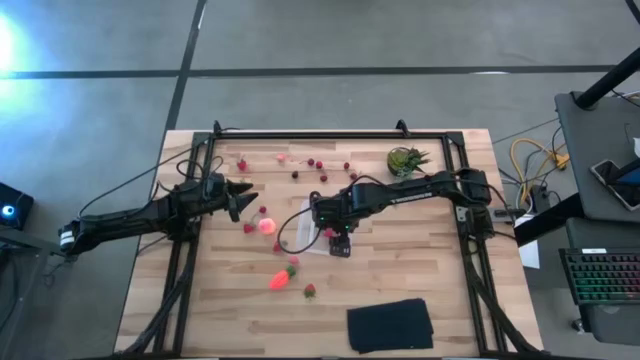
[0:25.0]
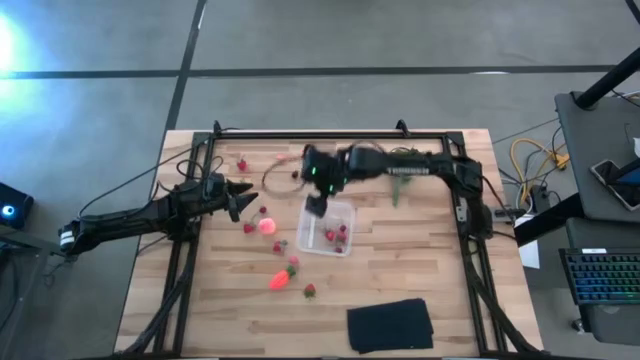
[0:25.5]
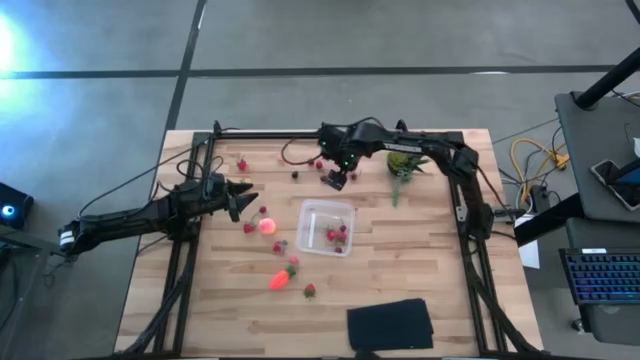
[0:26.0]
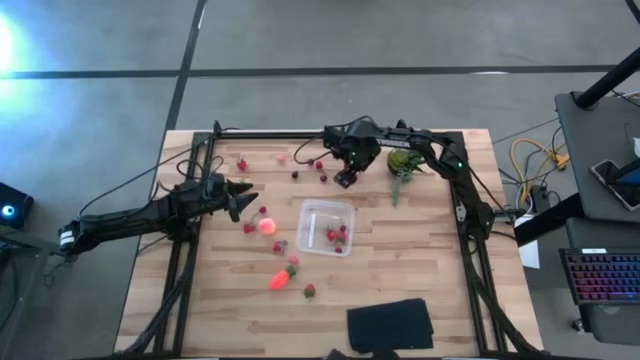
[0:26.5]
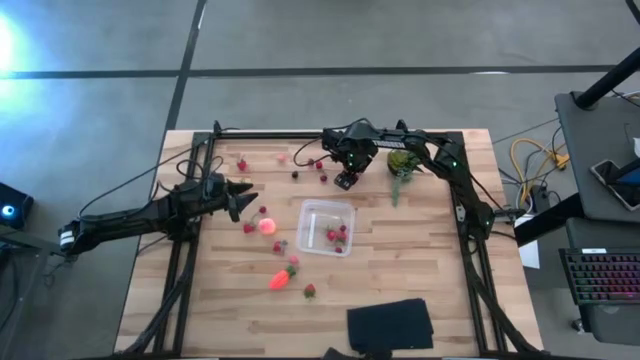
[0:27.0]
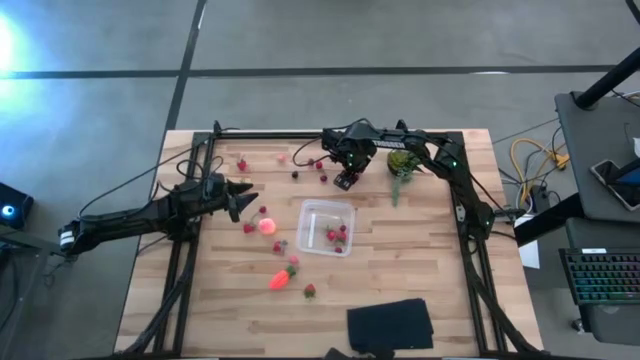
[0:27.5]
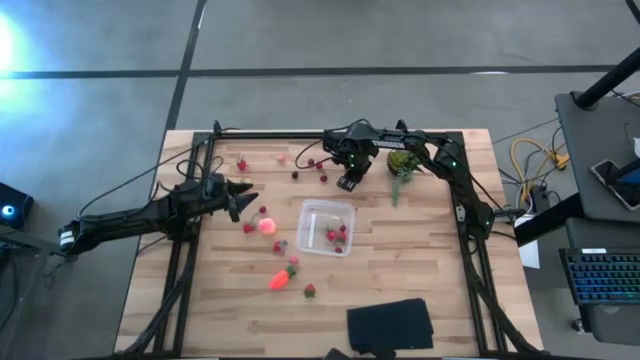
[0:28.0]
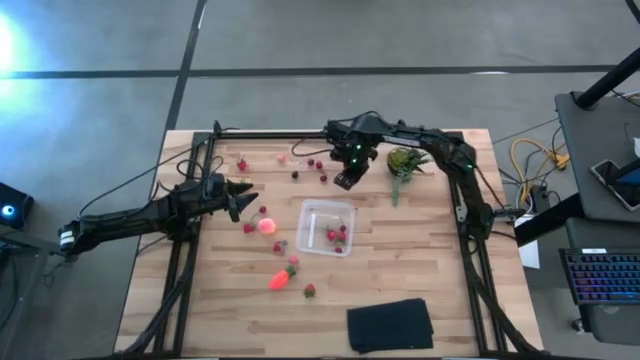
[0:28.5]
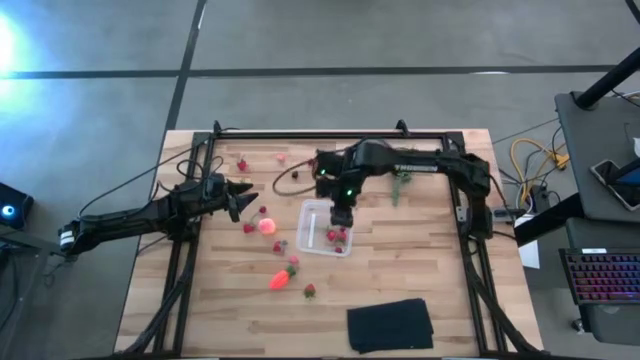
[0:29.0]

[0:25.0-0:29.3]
Task: Pick and placing Produce into tupperware
Put the red cherry into the transparent bin

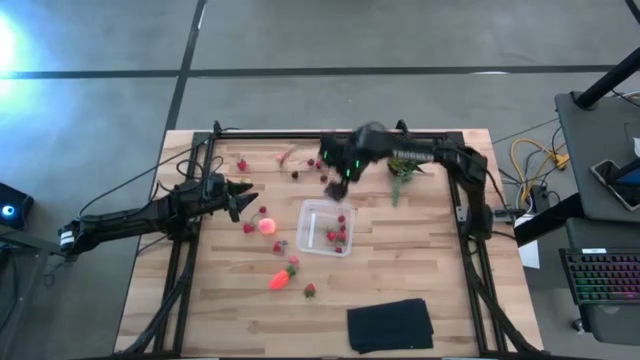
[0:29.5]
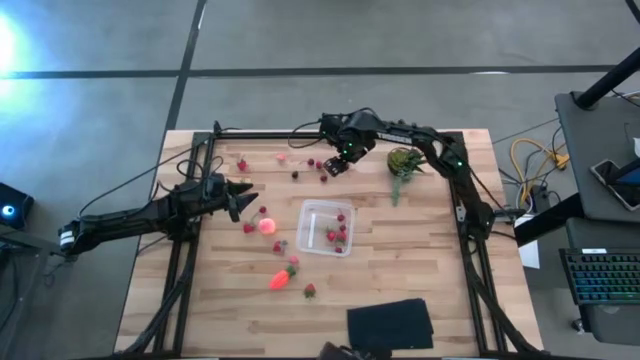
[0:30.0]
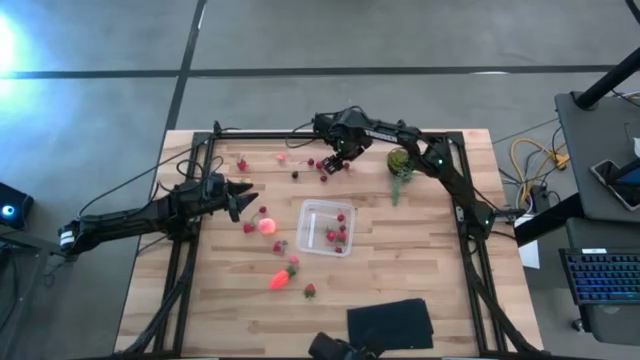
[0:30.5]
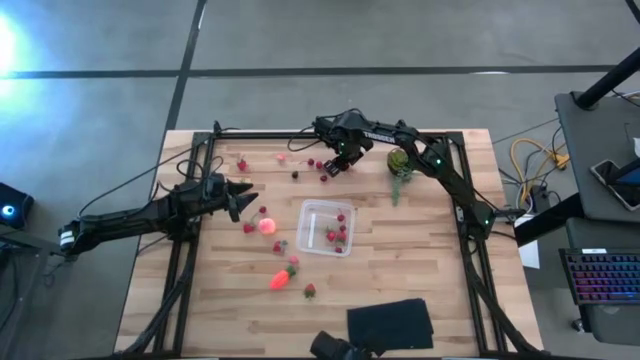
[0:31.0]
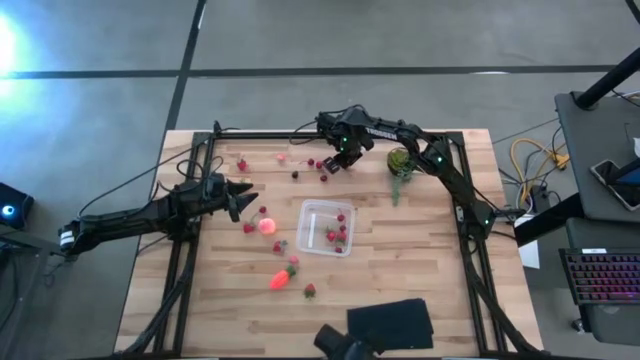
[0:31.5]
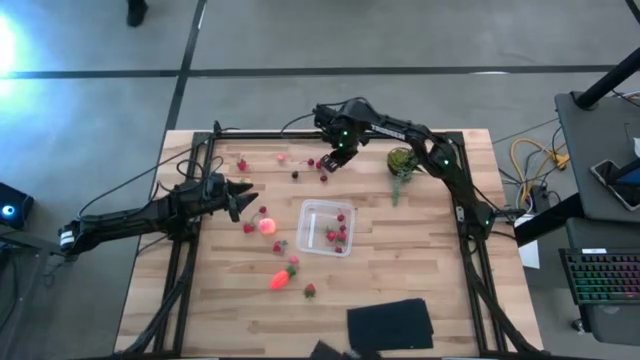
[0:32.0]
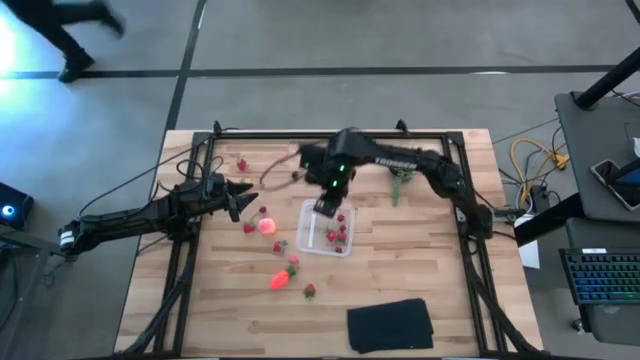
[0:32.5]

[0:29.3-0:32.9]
Put the red cherry into the transparent bin

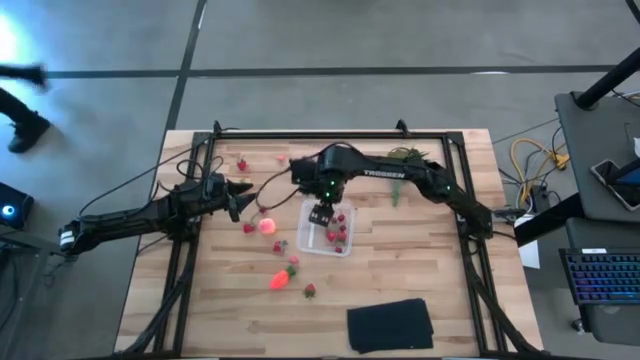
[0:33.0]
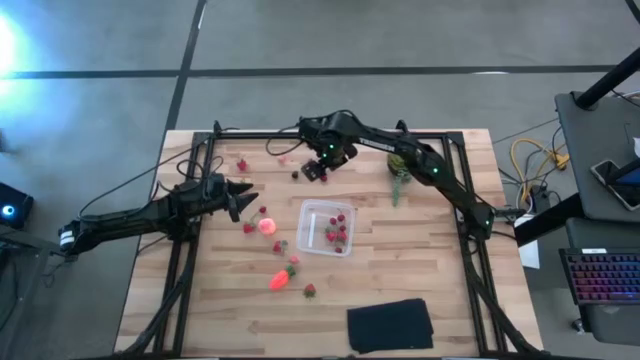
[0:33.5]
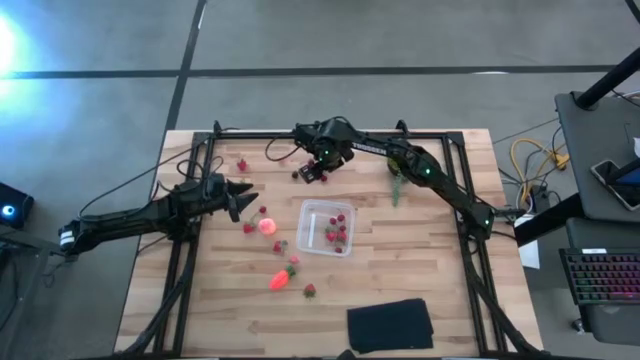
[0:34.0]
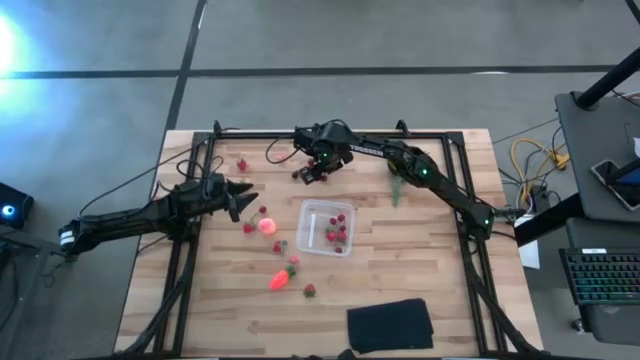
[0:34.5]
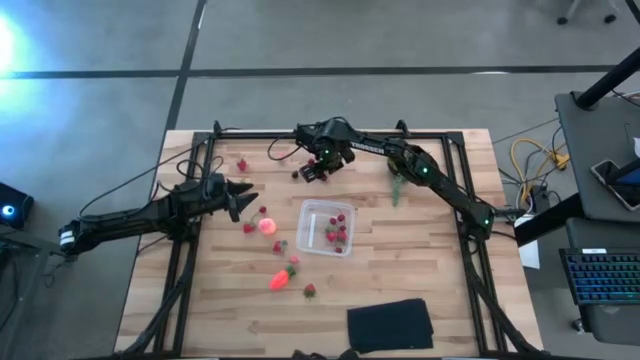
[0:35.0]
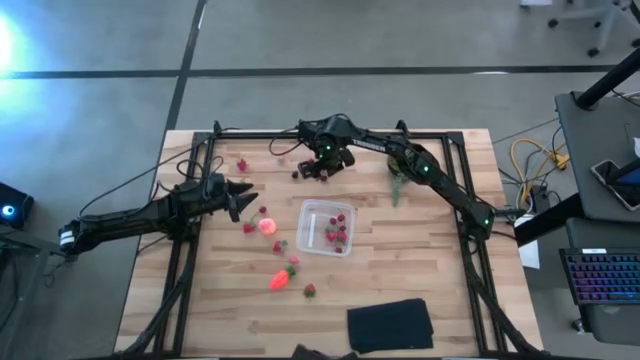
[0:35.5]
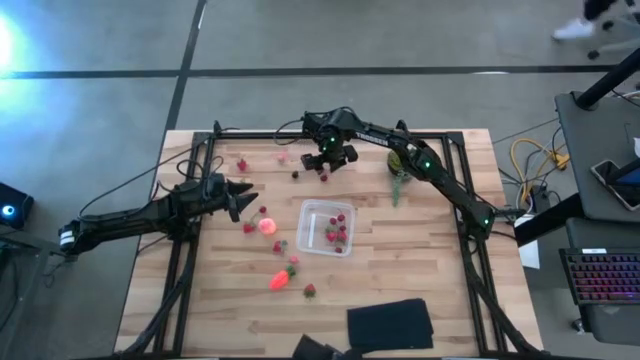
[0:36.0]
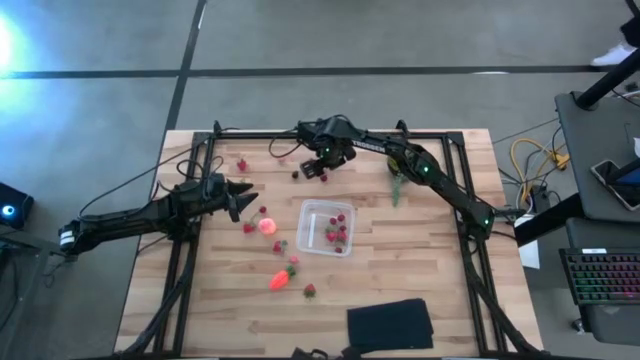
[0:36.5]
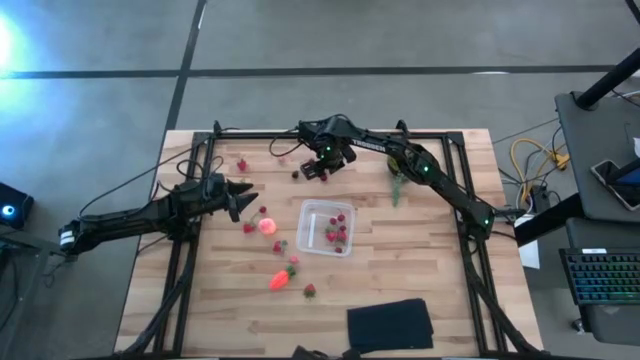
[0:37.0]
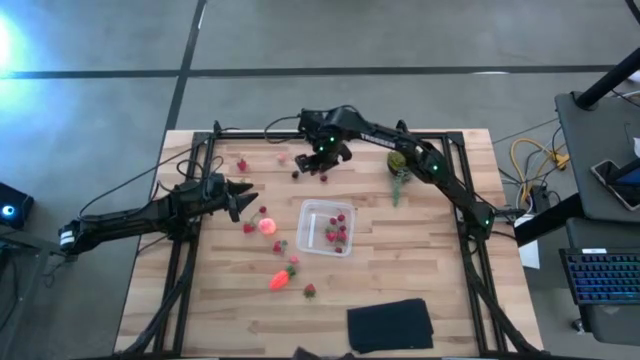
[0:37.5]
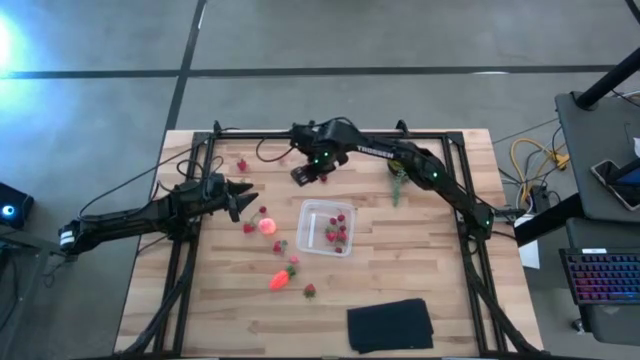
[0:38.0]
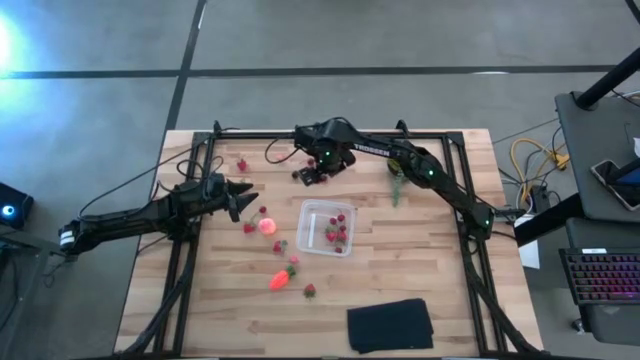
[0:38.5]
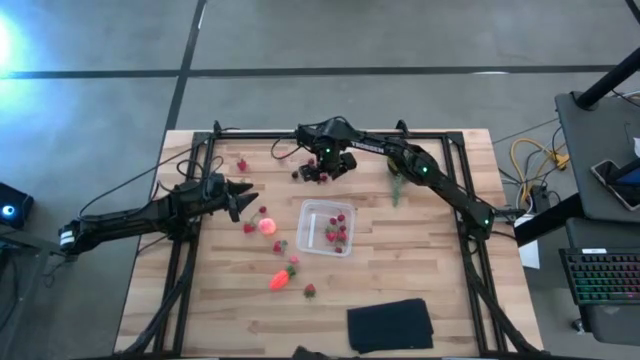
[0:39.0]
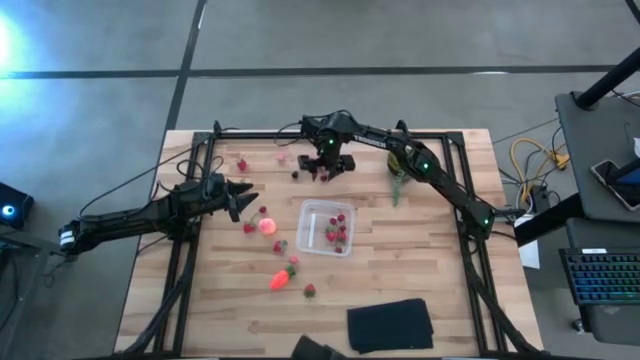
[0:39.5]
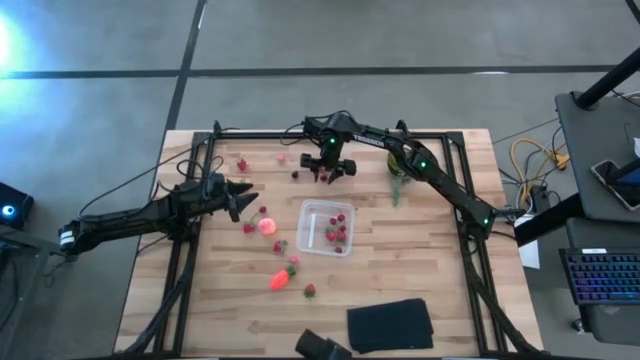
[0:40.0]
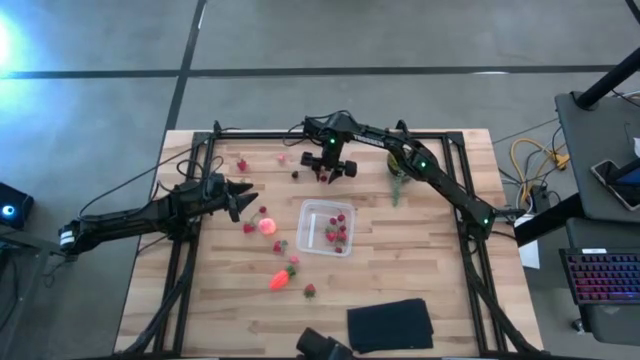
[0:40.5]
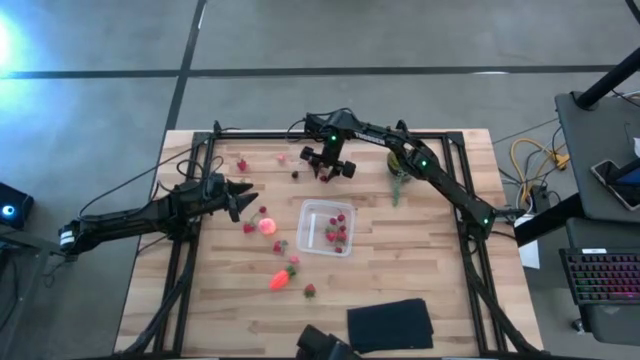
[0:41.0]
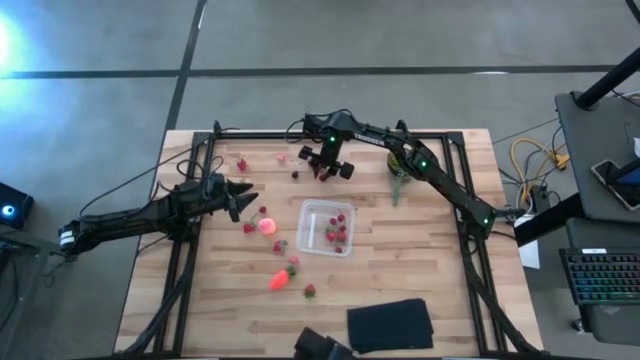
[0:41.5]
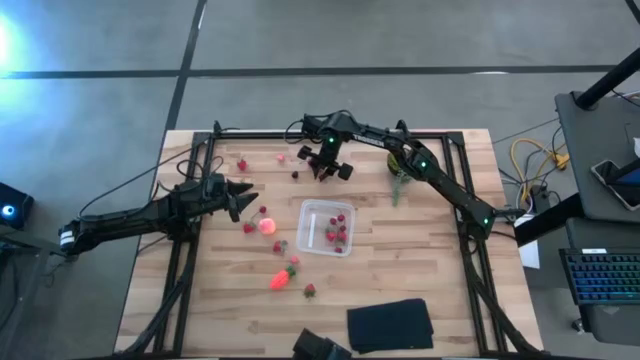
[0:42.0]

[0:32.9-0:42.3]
Put the red cherry into the transparent bin

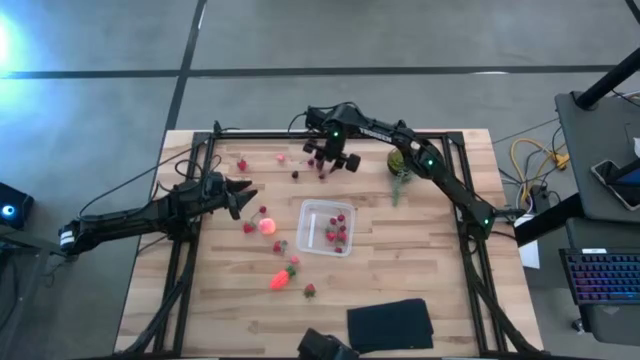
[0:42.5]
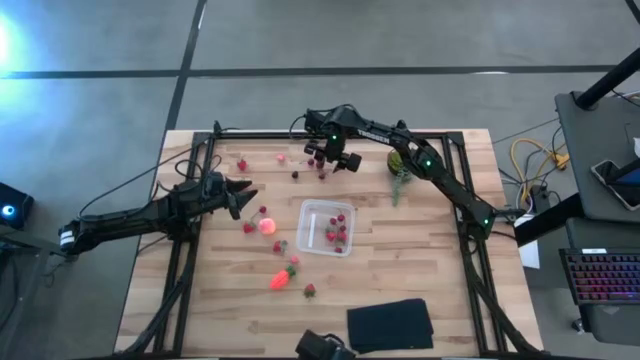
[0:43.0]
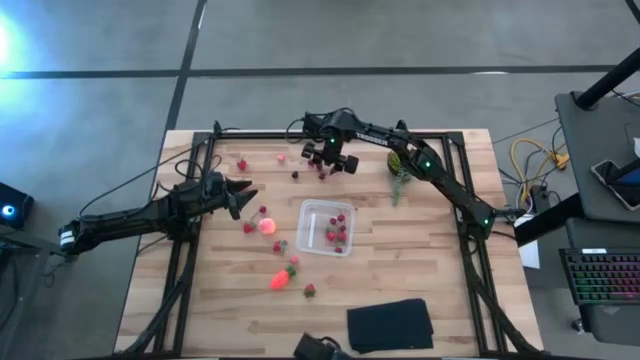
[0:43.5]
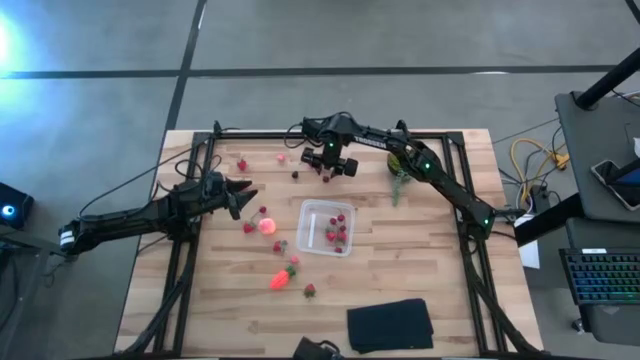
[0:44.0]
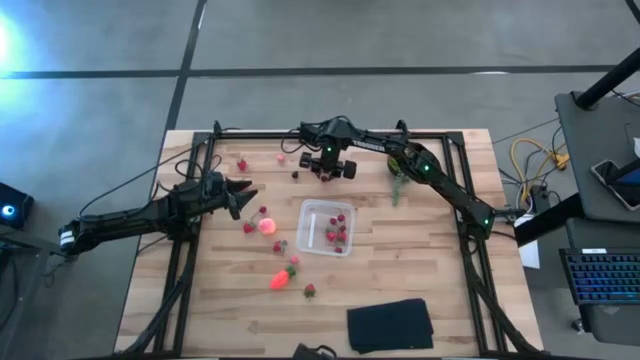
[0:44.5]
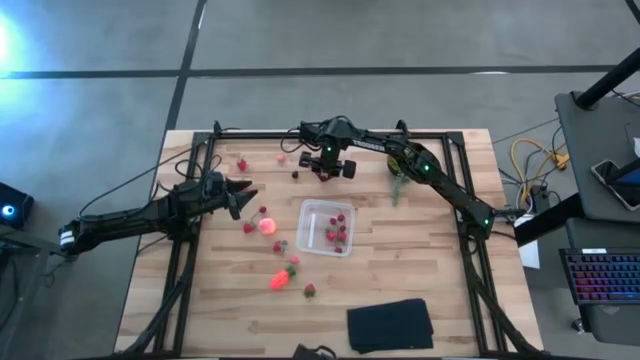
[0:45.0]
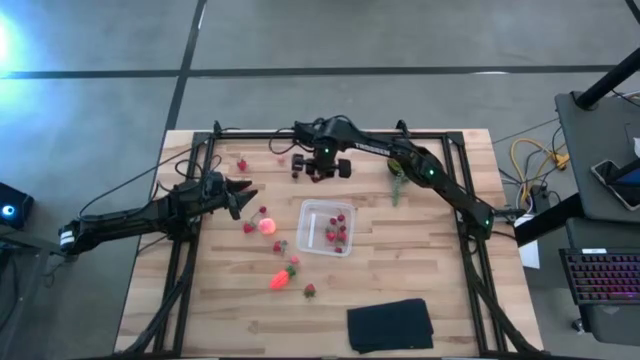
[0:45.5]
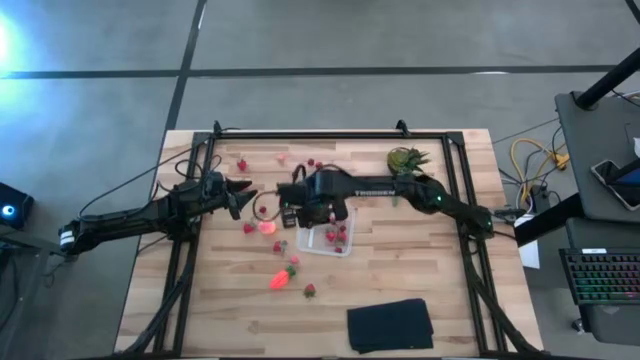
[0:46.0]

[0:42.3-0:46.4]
Put the red cherry into the transparent bin
